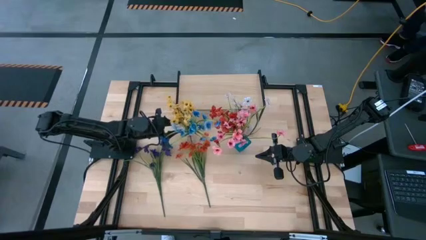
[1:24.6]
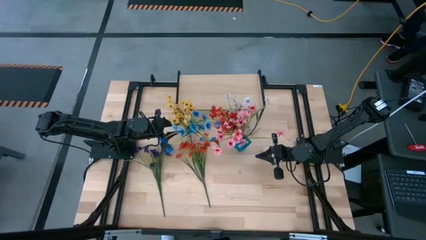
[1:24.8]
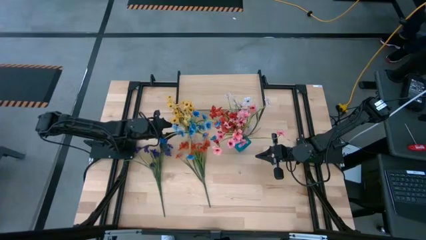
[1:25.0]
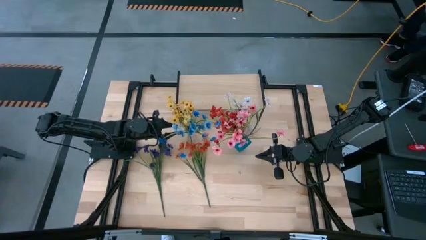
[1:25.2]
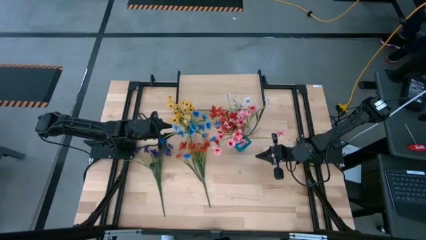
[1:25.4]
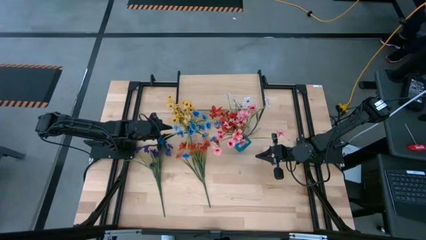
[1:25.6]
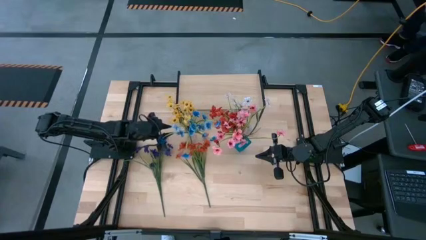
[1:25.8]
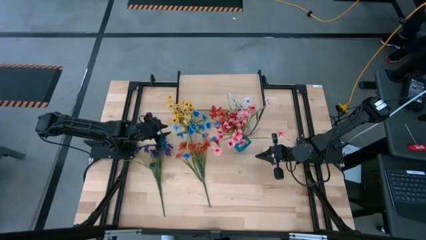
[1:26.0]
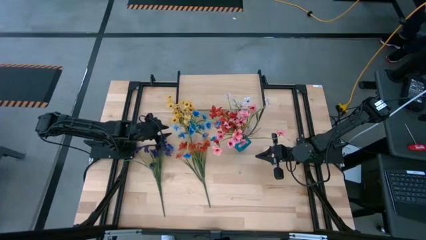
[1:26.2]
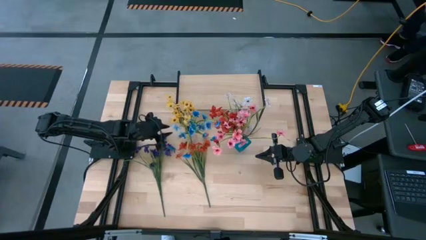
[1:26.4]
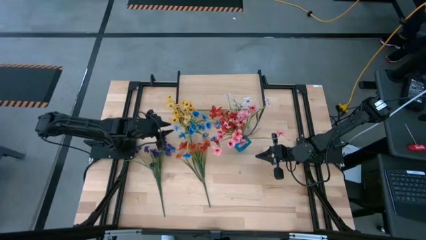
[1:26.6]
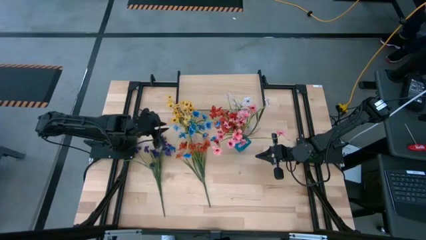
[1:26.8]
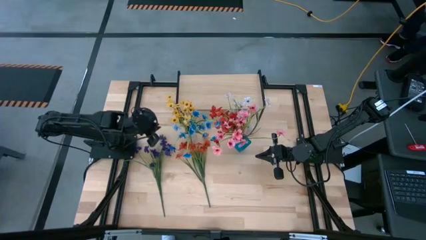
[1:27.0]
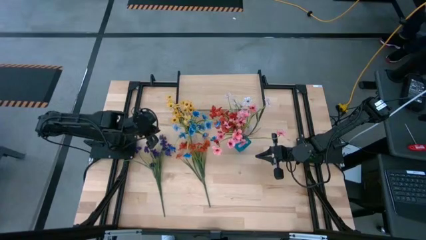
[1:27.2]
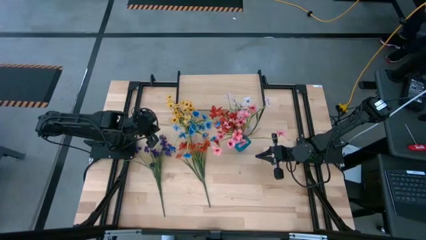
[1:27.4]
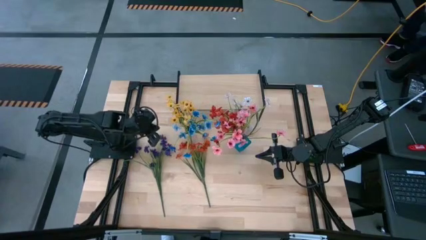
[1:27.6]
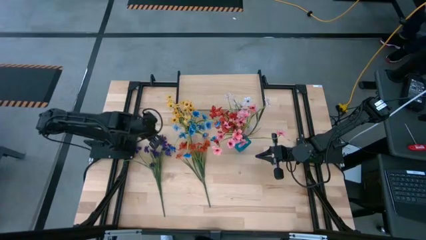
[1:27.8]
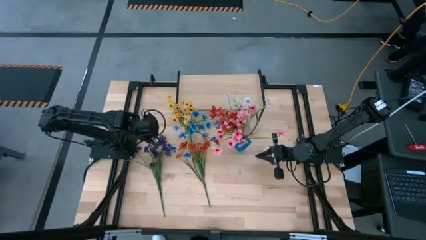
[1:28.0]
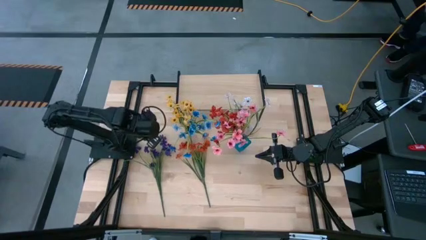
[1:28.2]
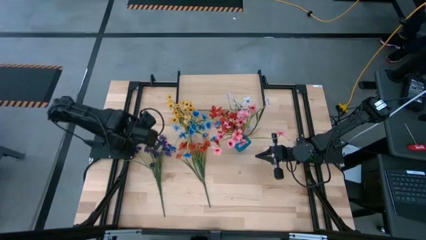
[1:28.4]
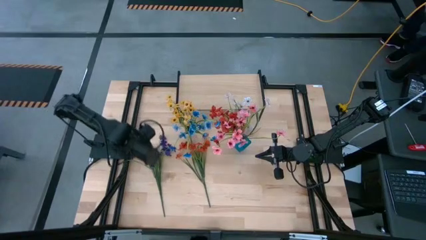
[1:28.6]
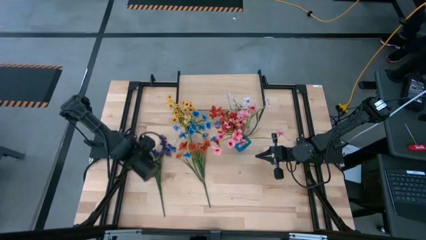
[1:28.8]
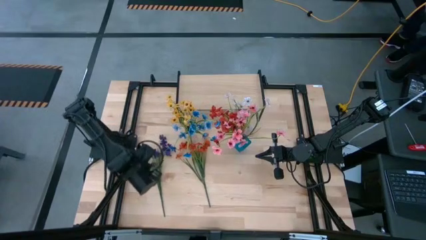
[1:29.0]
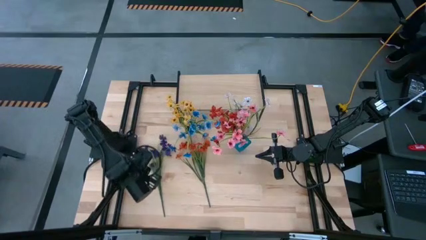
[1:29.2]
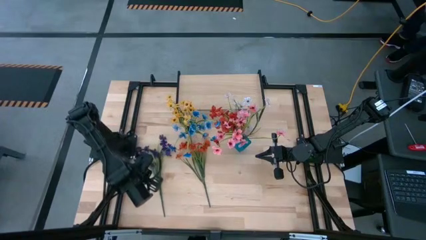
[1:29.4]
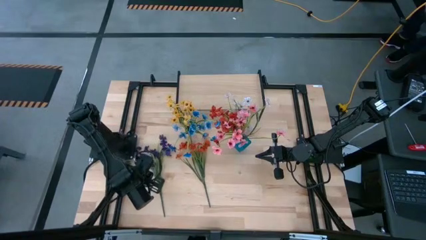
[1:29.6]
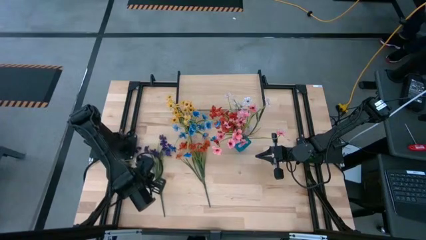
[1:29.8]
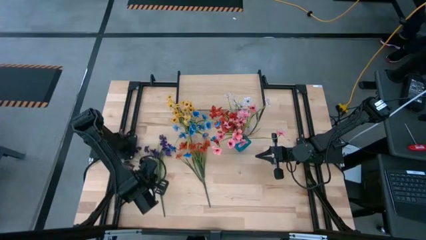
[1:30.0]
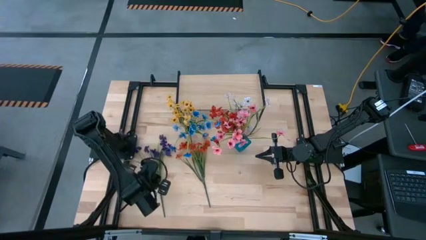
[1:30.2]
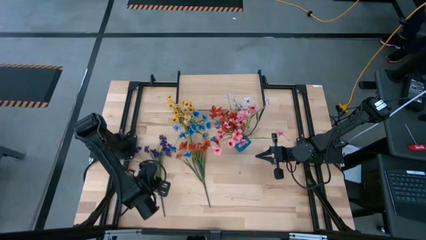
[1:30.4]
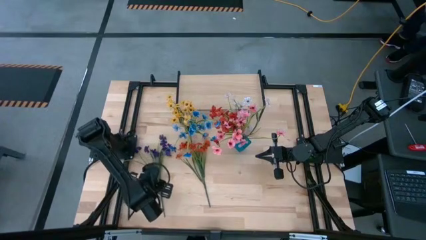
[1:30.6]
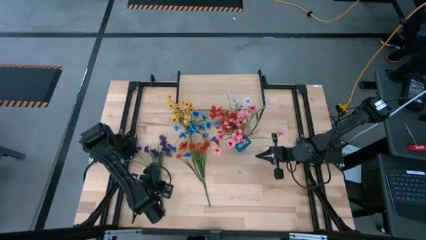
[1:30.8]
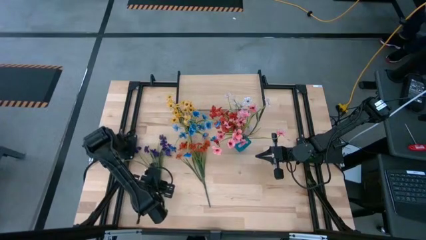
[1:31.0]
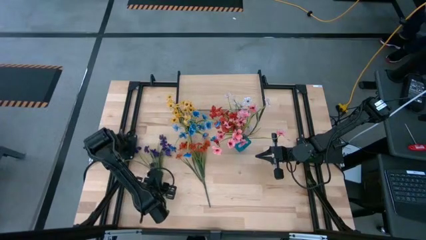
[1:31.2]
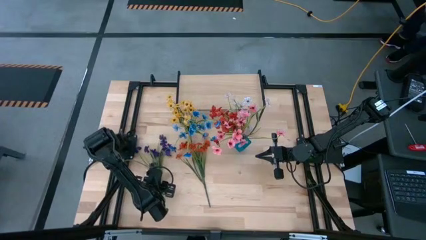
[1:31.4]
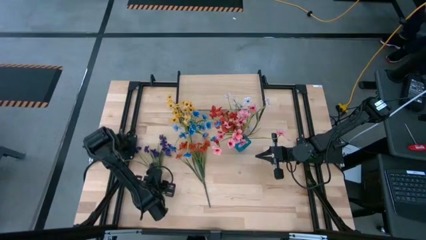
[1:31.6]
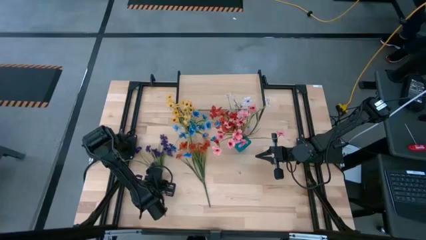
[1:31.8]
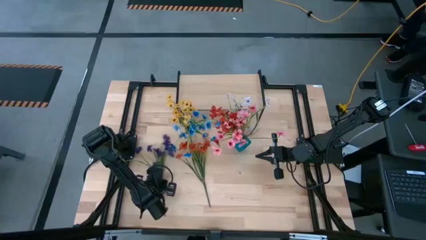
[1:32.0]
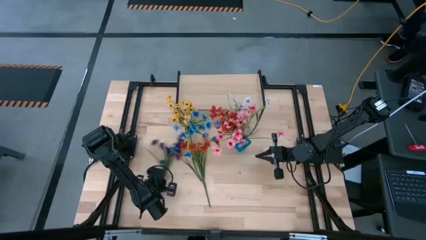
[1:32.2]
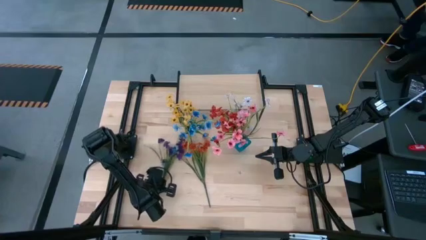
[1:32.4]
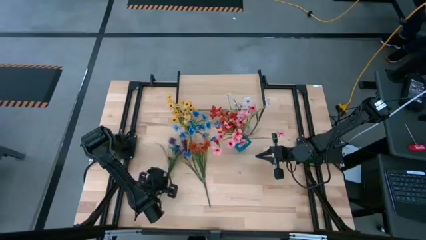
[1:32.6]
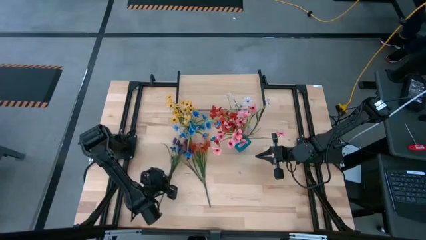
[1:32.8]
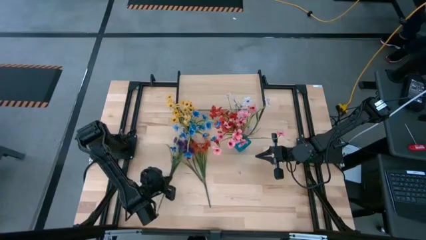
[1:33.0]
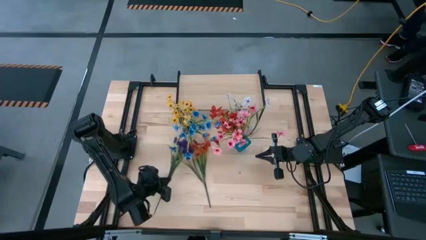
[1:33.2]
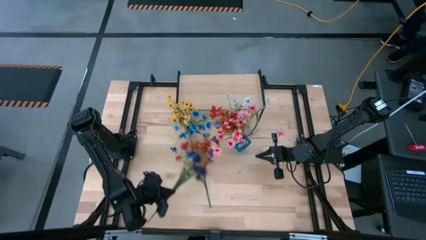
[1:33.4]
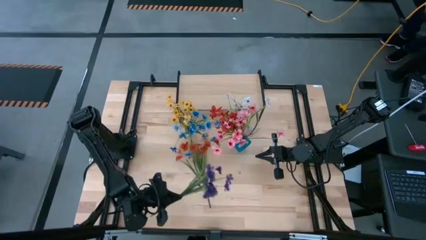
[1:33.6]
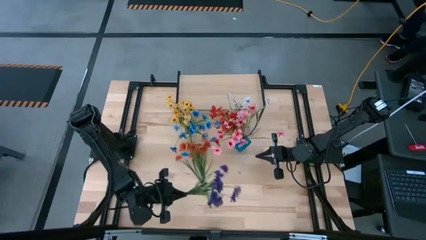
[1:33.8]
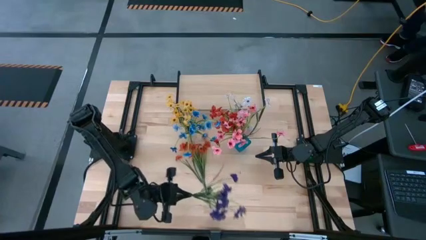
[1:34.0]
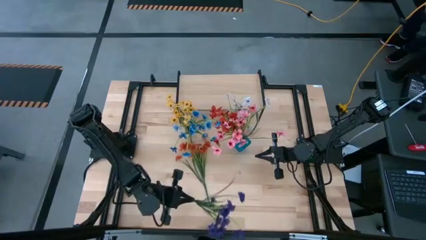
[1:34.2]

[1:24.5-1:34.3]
Task: Pick and place flowers into a vace then onto a shelf
Put the violet flowers into the transparent vase

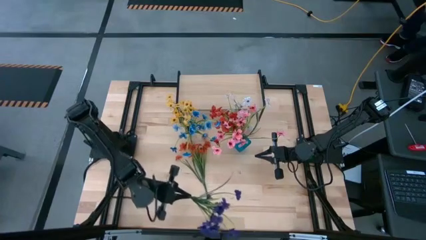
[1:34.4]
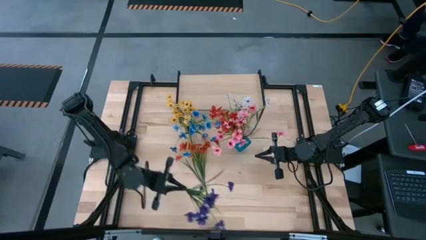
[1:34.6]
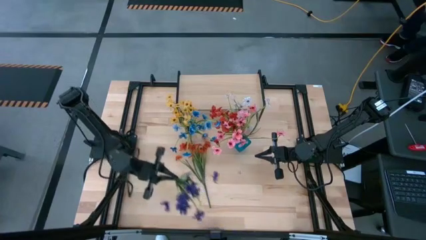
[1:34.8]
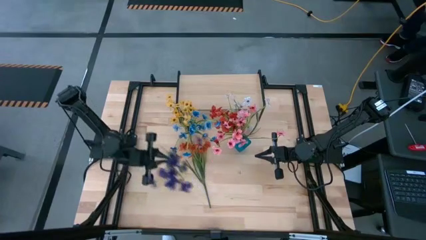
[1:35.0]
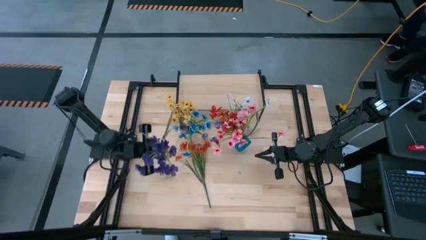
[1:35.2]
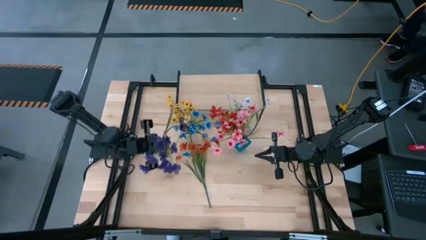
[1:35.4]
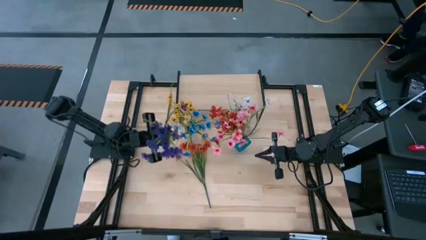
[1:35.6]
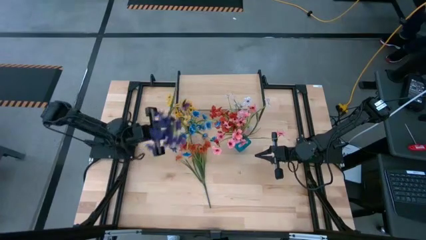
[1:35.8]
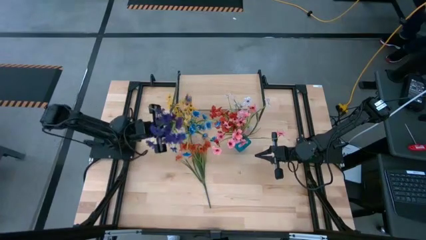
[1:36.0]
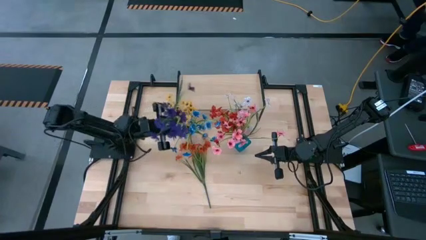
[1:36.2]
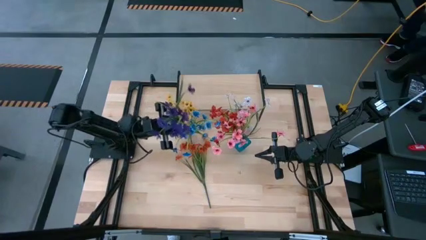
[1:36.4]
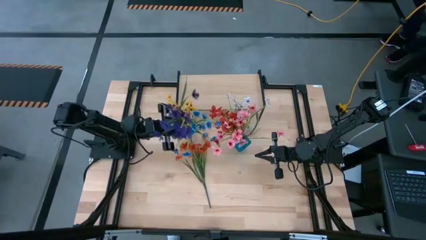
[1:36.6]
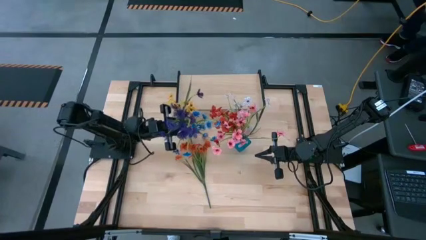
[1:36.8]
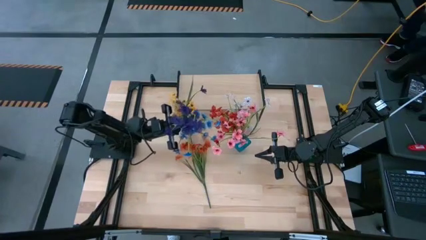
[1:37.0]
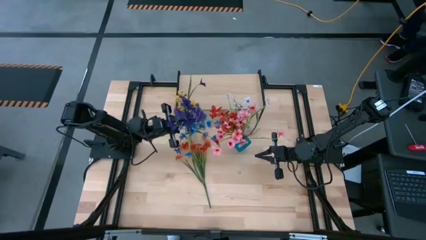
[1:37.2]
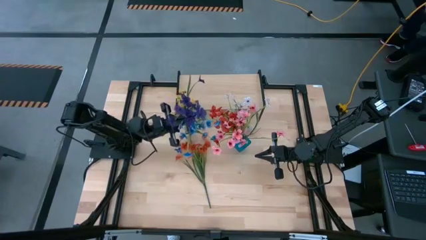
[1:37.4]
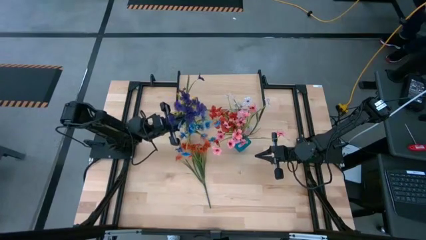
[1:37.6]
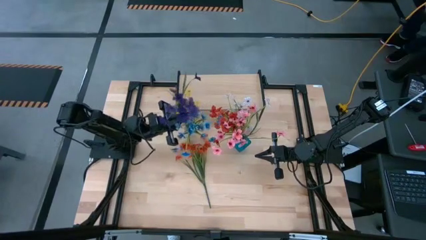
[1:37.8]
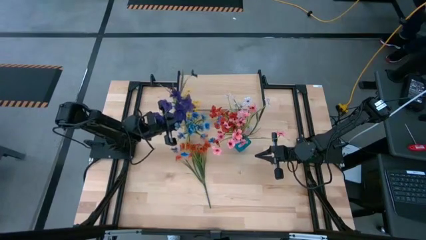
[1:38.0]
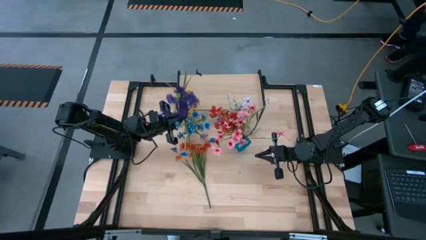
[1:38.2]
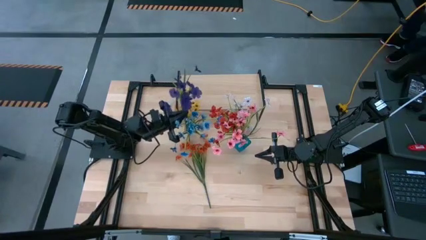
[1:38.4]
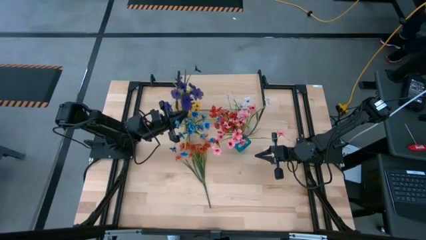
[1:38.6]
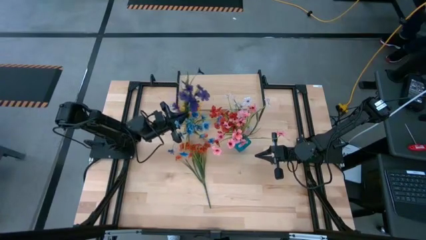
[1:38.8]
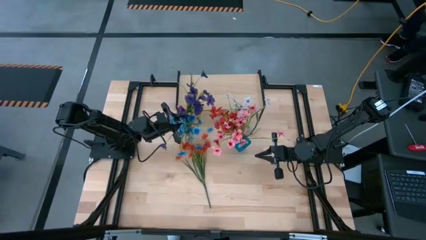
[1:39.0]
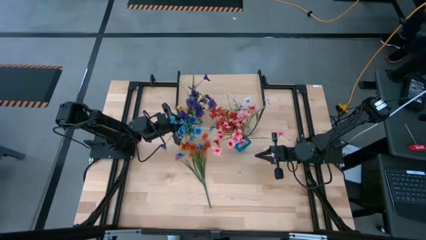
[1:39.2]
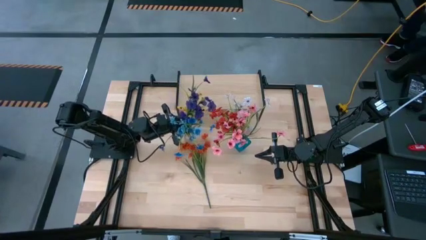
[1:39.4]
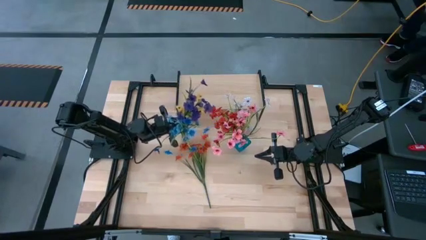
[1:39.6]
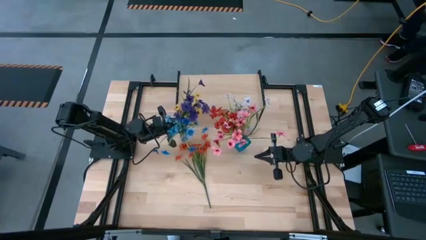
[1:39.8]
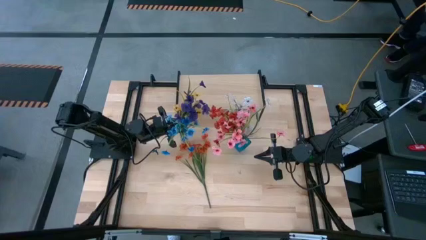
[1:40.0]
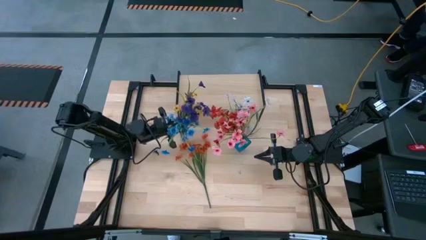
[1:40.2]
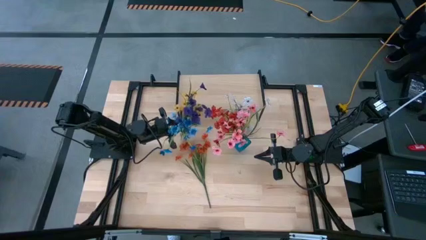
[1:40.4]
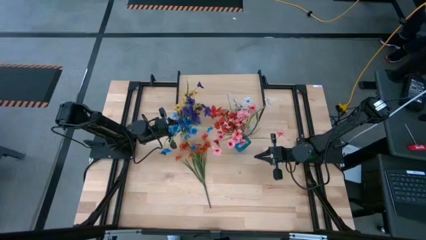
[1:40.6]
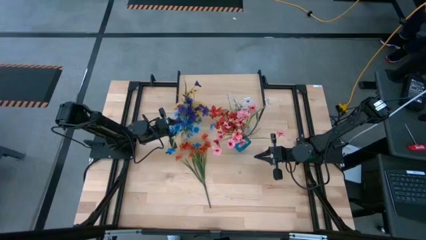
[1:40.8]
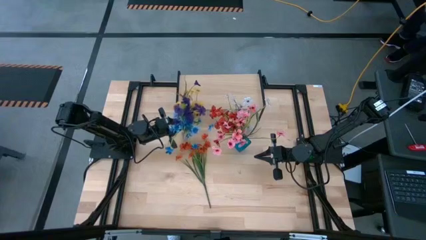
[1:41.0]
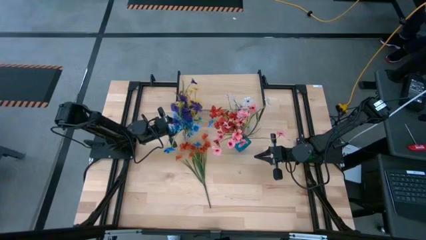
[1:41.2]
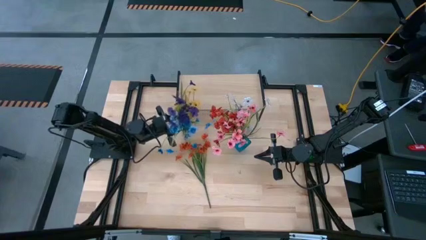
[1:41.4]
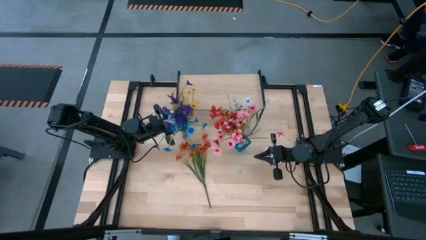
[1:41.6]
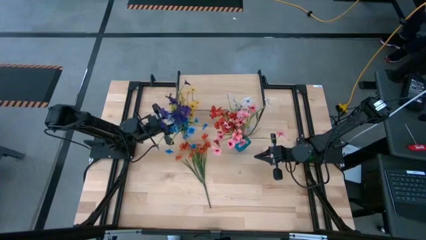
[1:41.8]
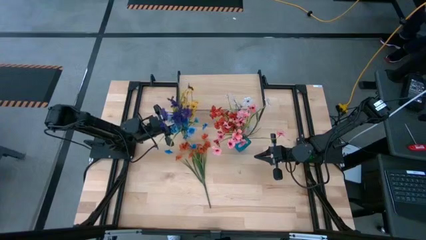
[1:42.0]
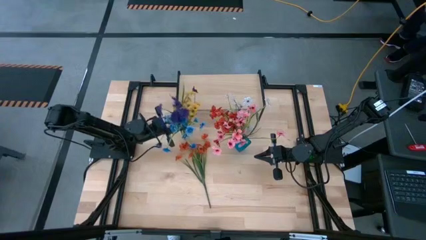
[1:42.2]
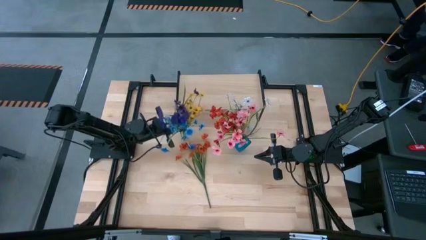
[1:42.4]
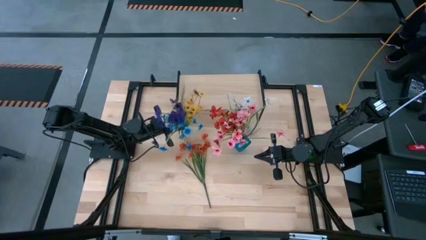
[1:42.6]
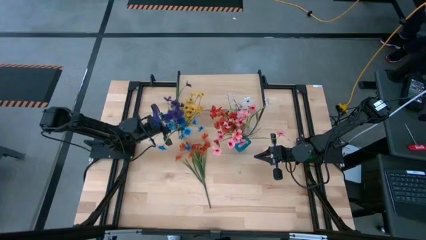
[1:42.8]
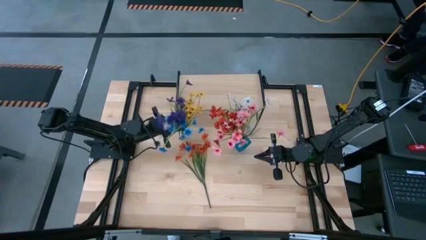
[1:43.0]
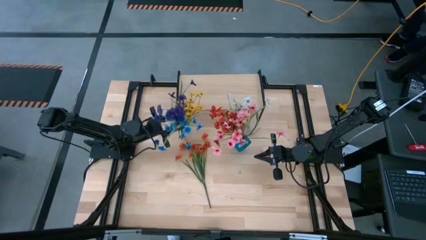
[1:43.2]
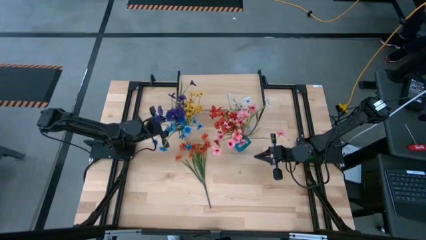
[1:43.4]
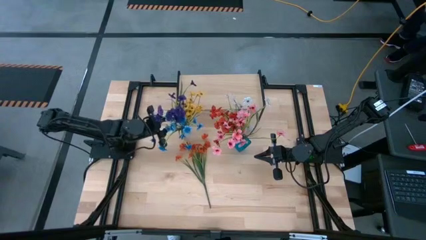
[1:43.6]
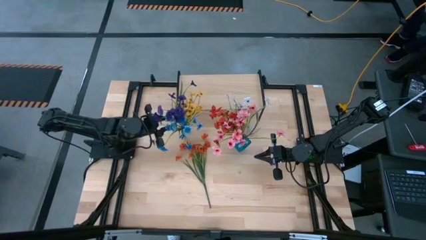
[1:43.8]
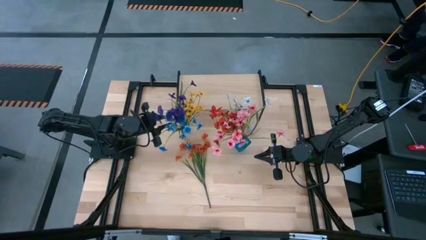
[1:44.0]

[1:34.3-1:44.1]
Put the violet flowers into the transparent vase
